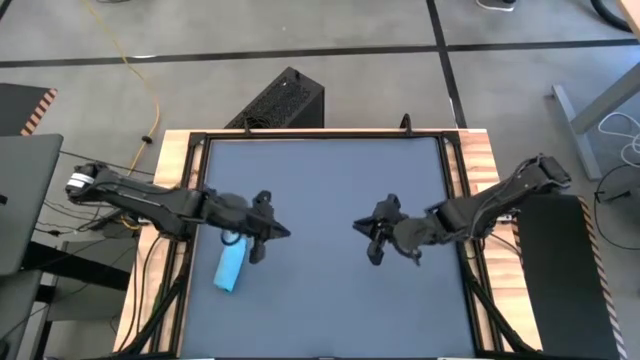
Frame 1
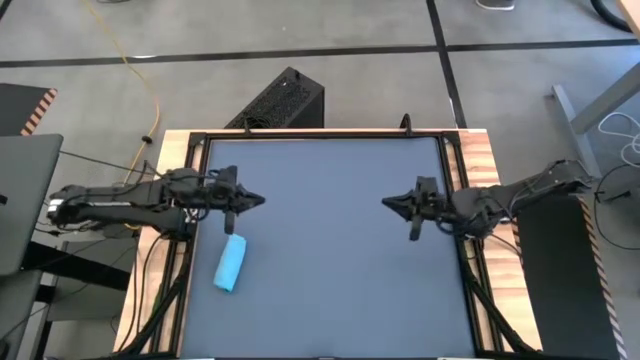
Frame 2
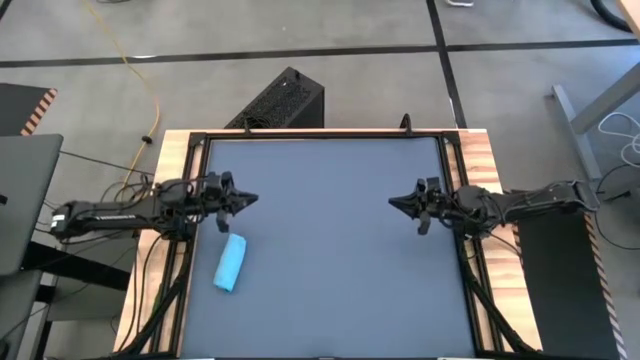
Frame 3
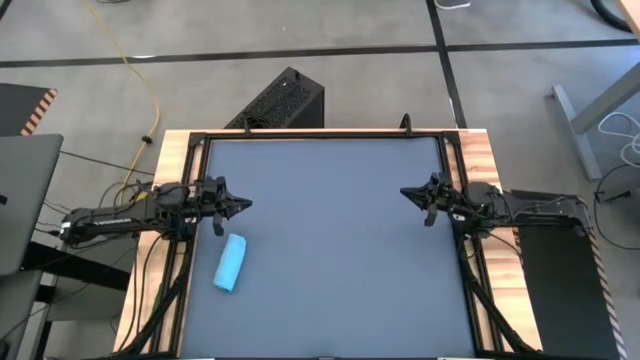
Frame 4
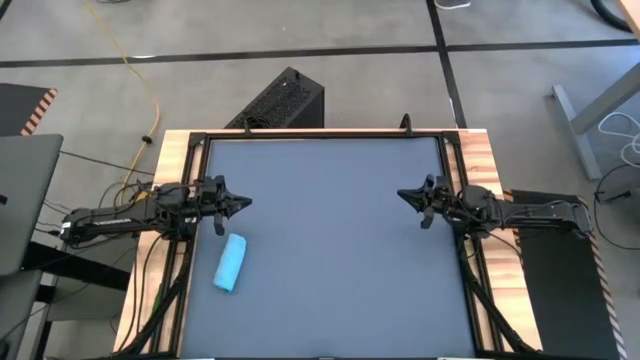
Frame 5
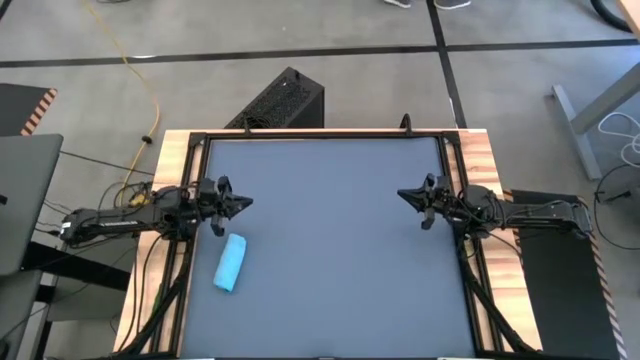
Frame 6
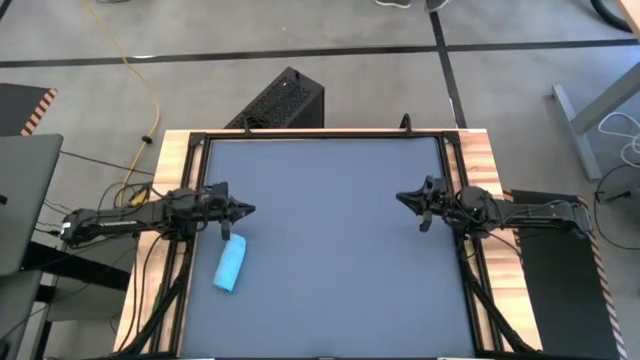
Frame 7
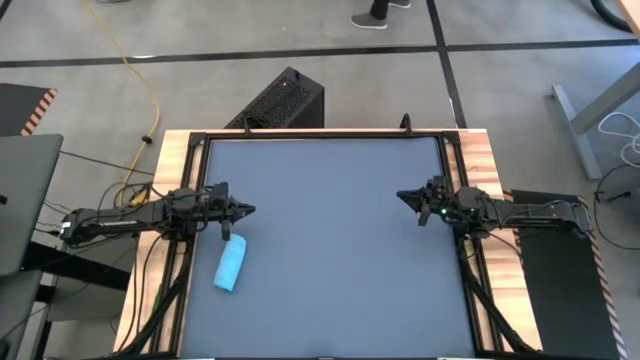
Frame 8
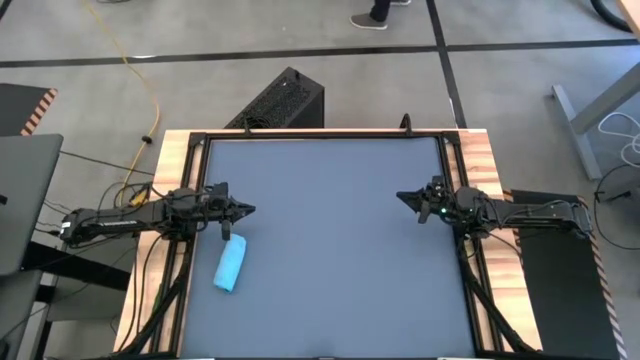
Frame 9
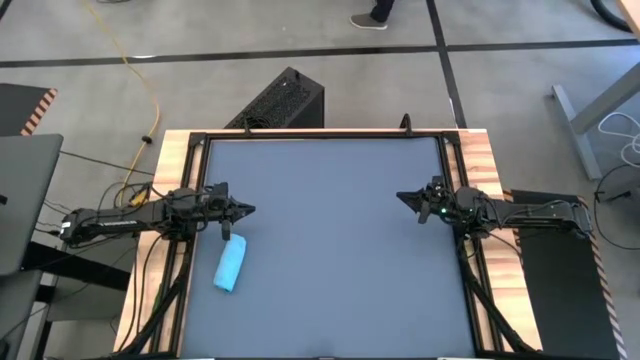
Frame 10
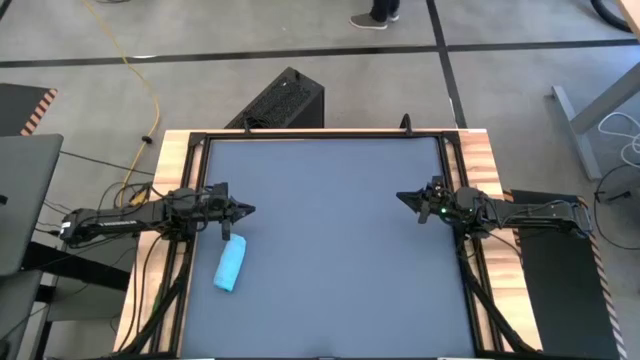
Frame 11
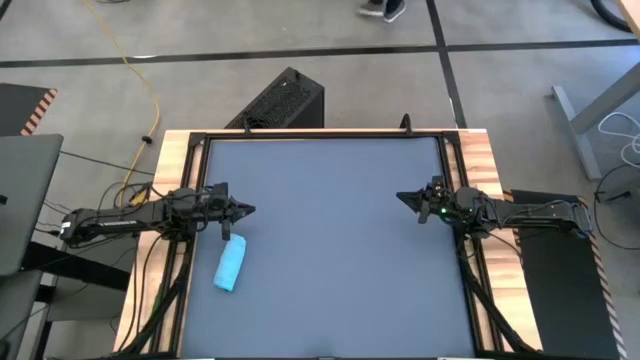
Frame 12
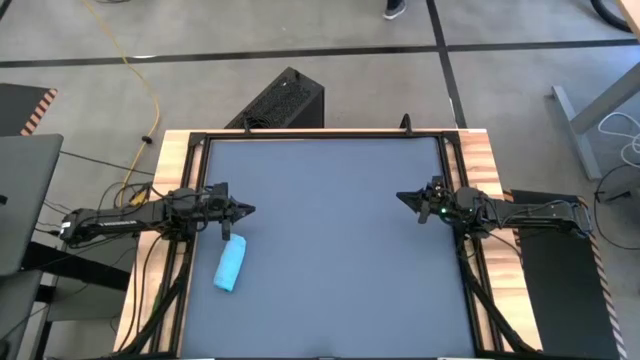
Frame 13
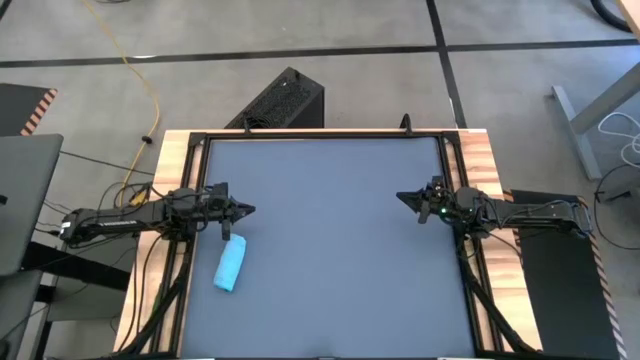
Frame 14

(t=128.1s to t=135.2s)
Task: Roll towel
Return to Home Position

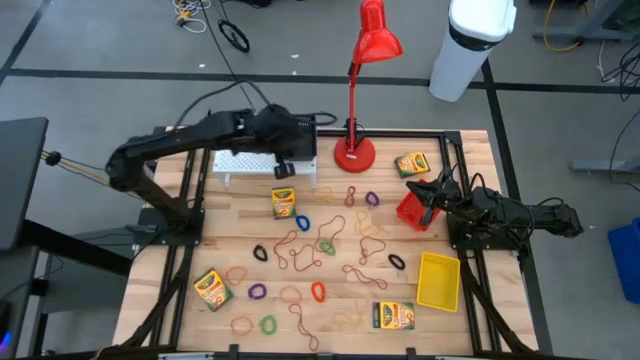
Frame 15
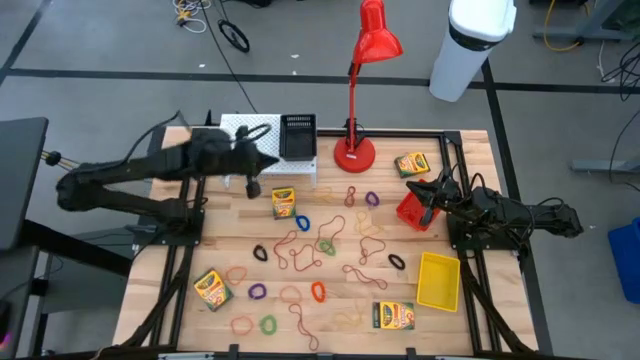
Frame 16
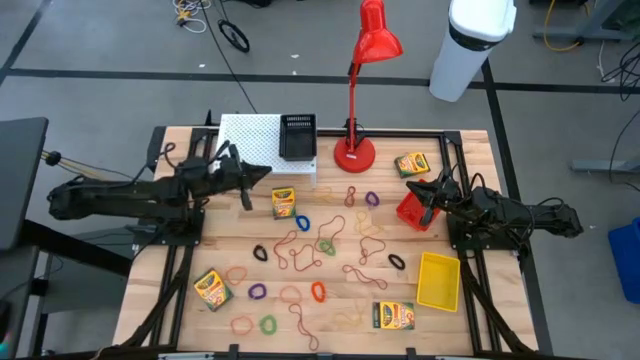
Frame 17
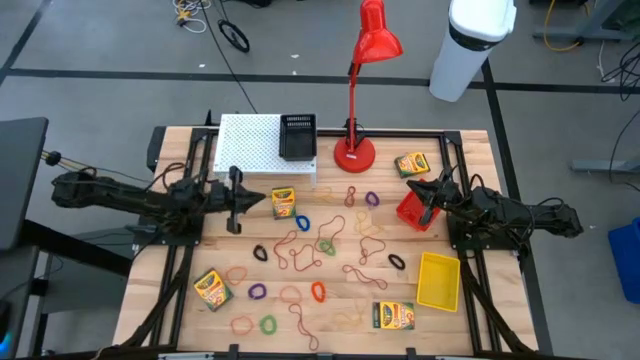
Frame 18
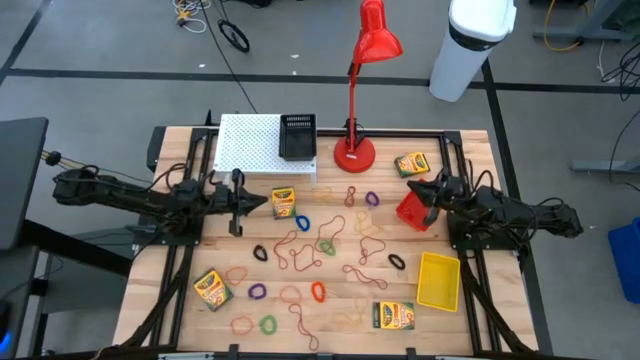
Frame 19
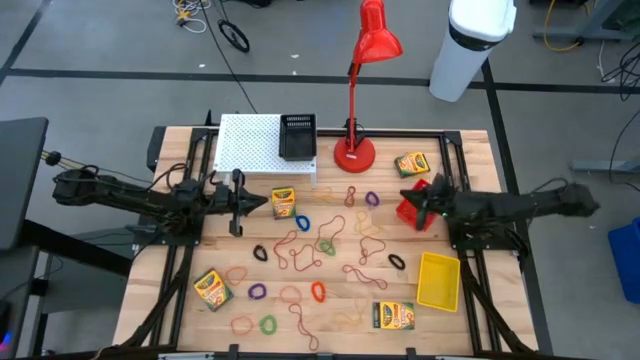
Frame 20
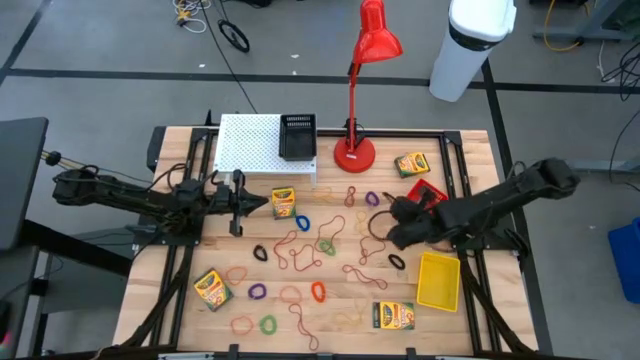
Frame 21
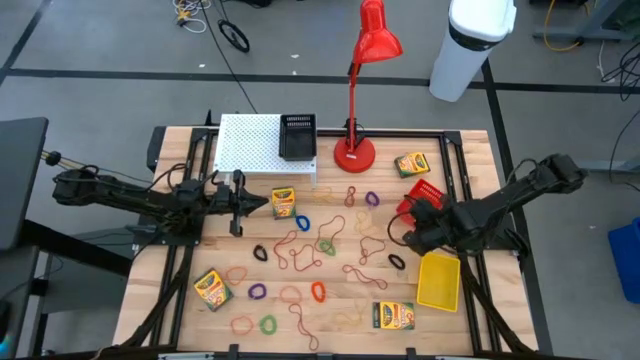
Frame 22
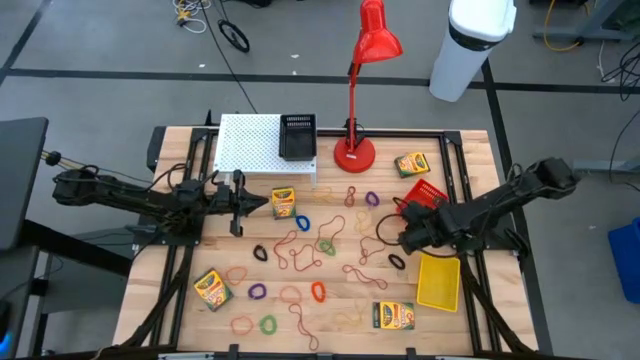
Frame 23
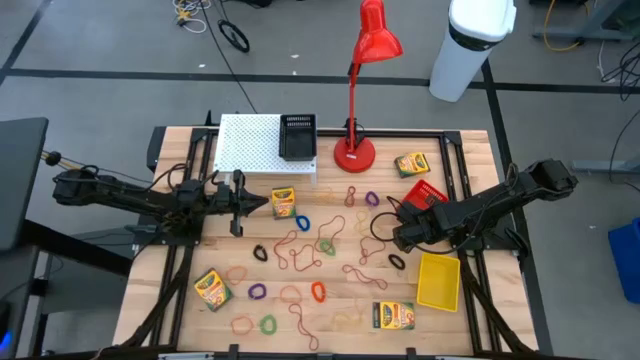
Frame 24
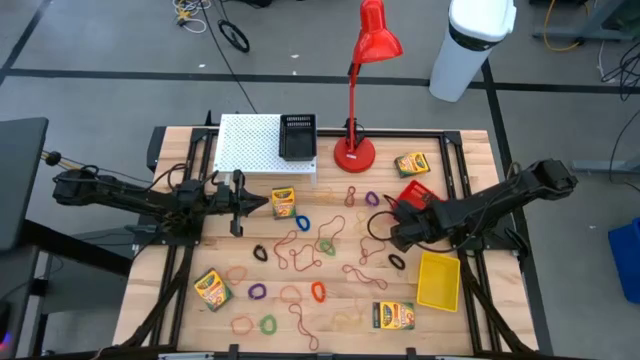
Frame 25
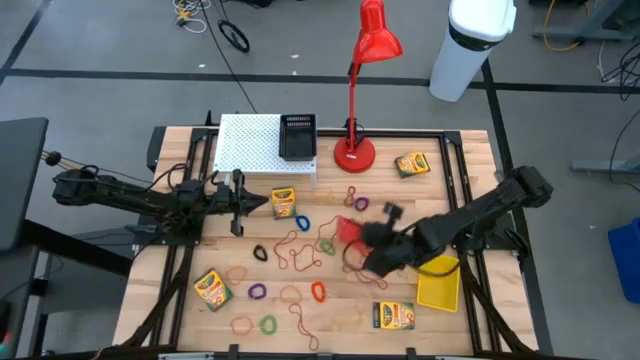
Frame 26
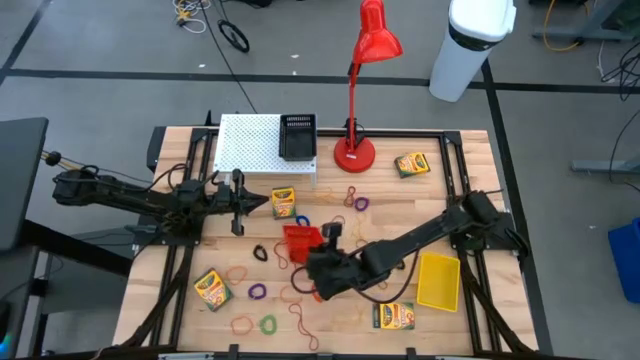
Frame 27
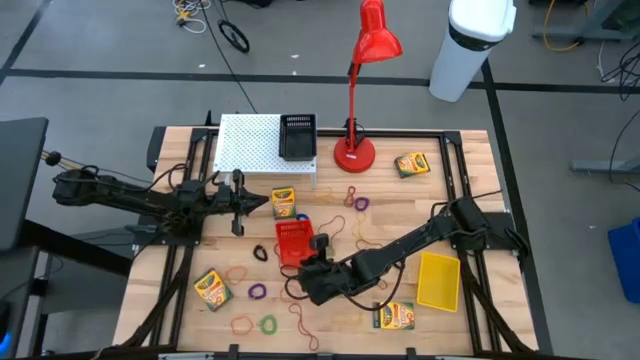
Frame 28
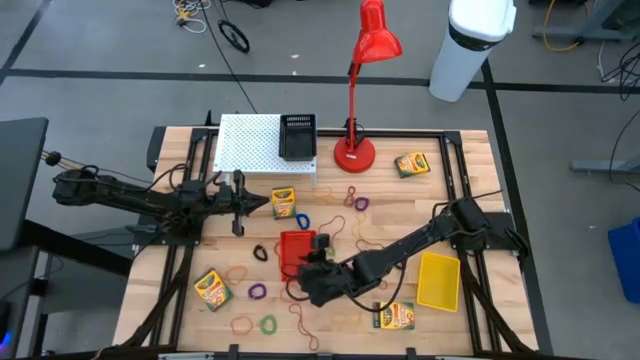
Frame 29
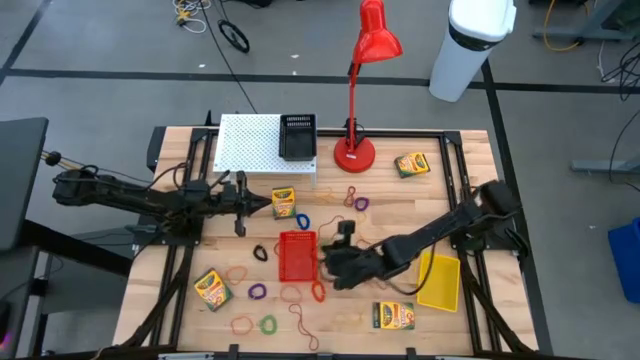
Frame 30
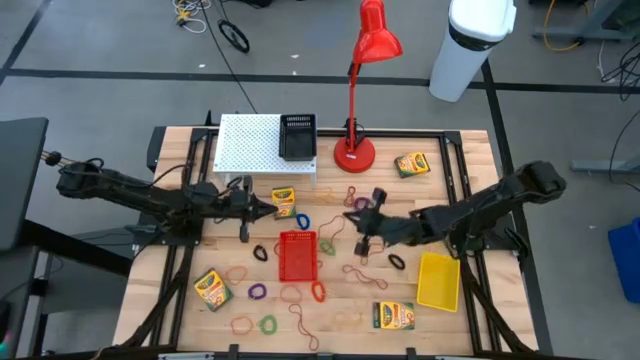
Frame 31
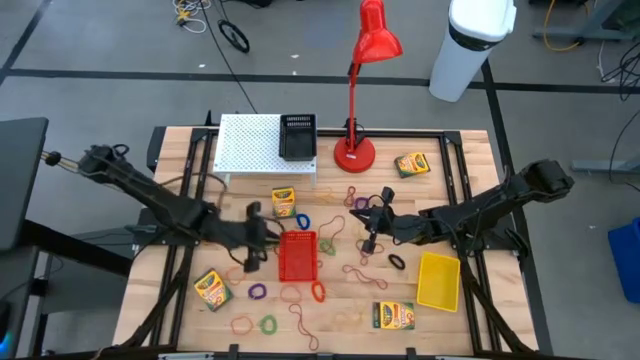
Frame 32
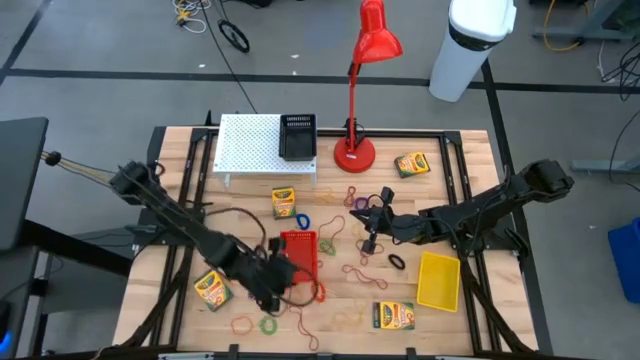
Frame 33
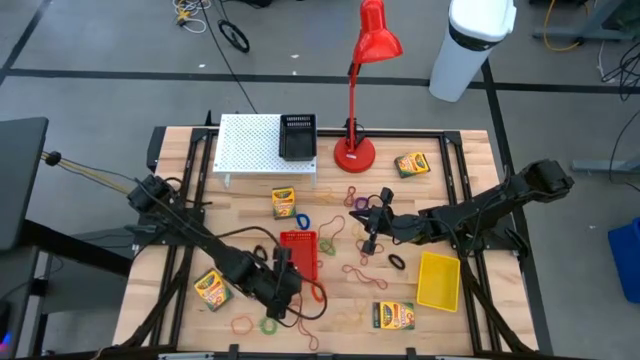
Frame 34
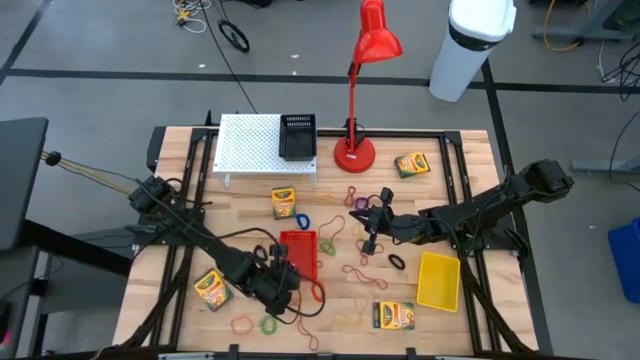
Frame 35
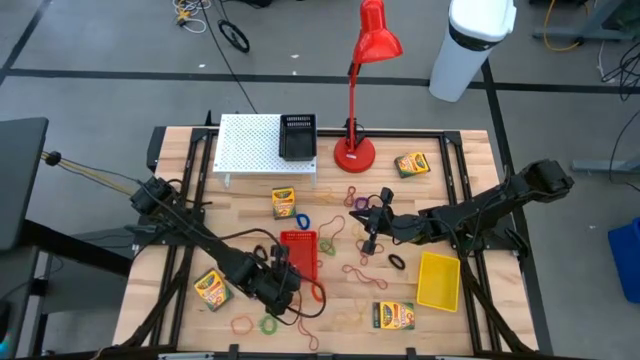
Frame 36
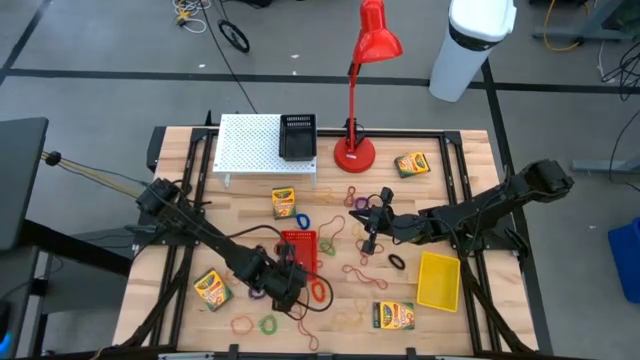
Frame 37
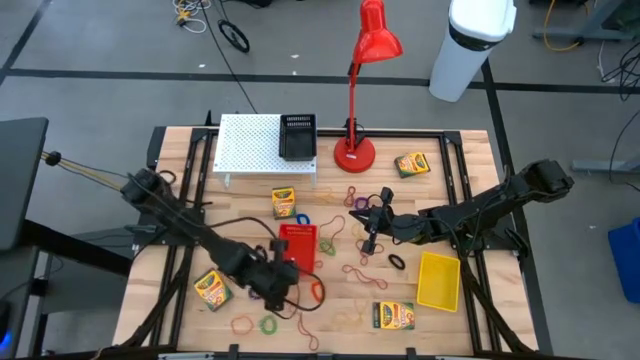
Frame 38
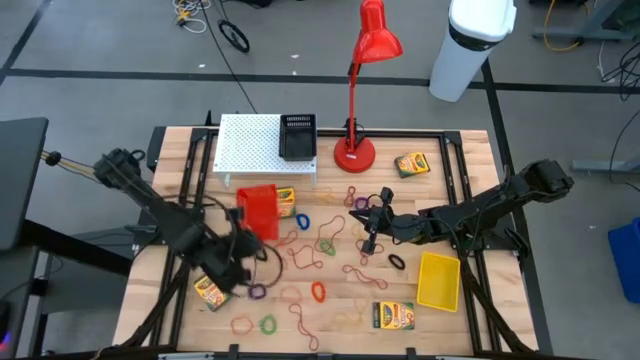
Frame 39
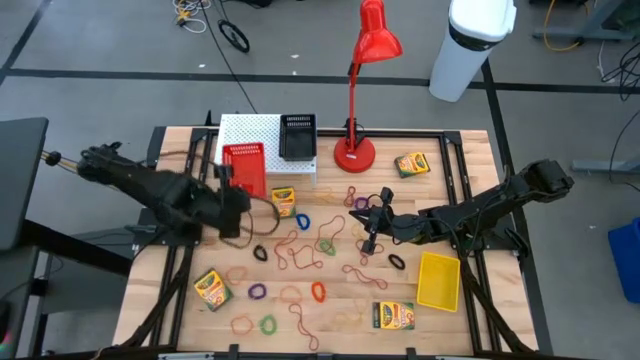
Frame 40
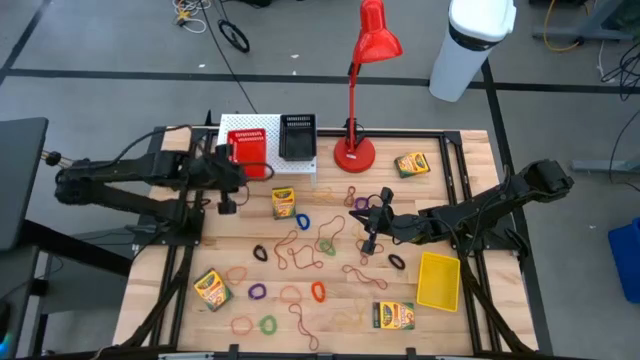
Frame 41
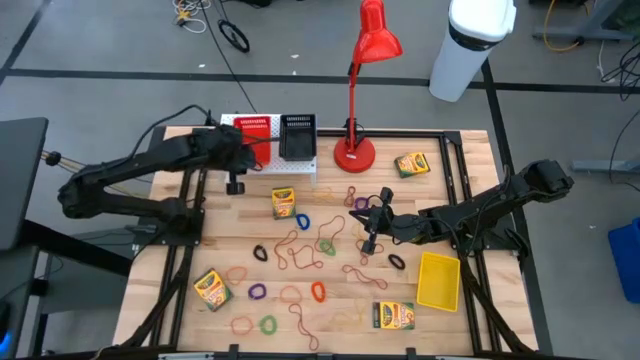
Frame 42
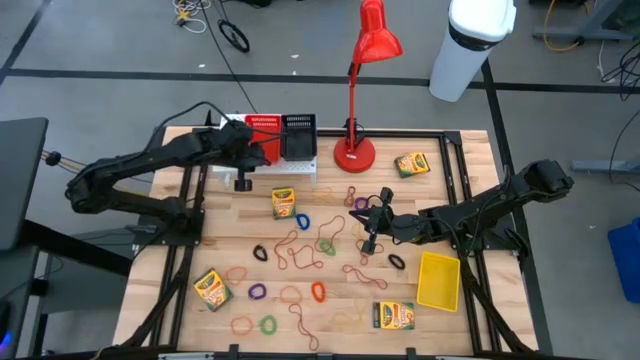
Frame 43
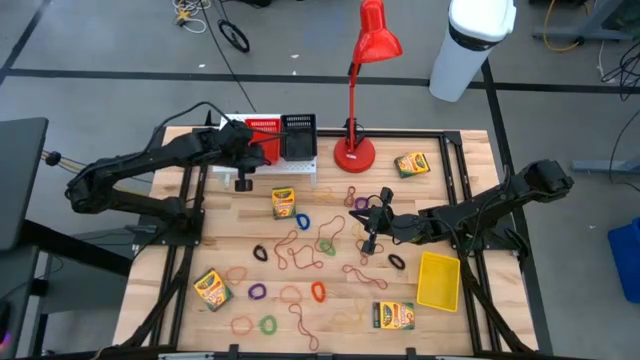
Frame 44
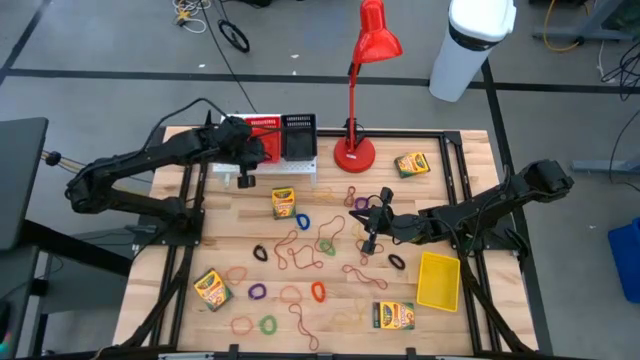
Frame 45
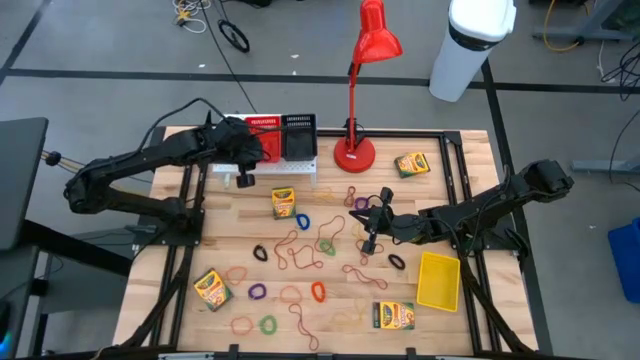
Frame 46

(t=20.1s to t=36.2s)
Task: Pick & Place Office Desk Supplies
Put the red bin on the shelf
